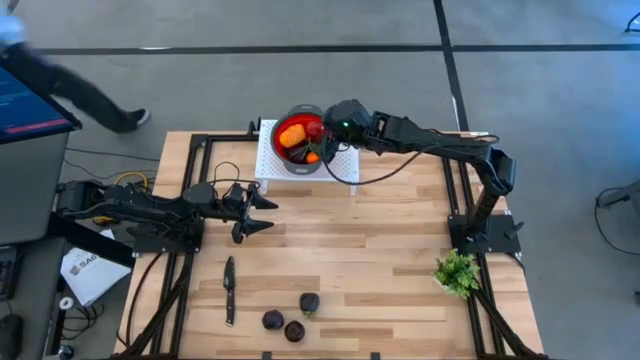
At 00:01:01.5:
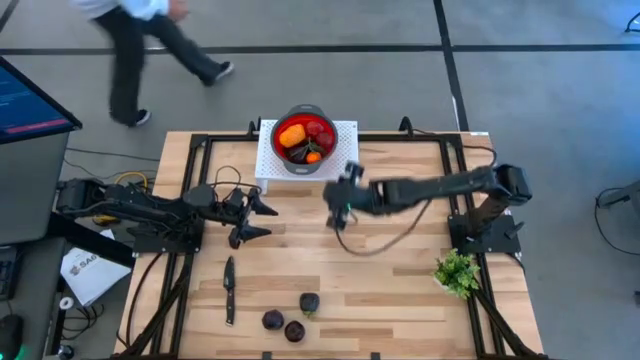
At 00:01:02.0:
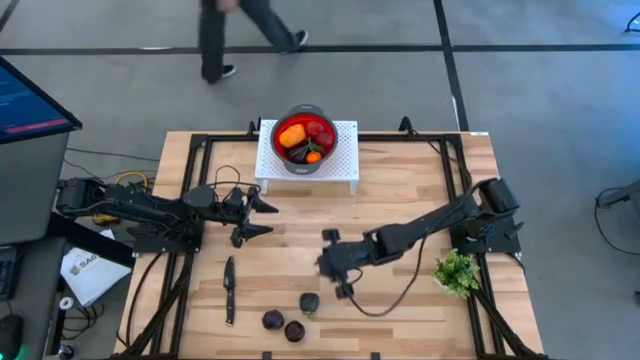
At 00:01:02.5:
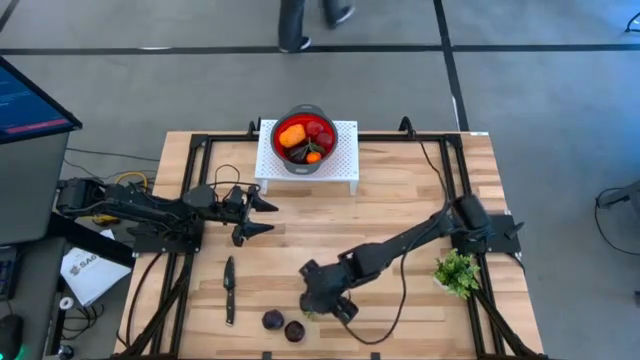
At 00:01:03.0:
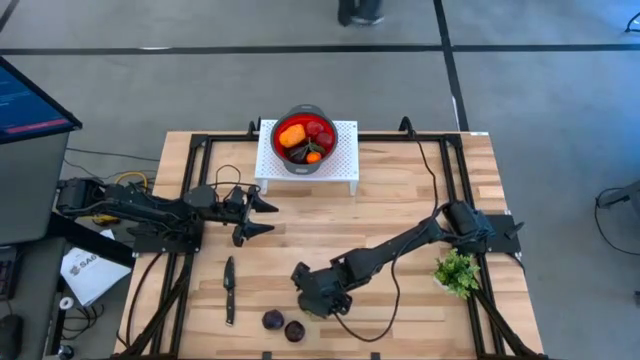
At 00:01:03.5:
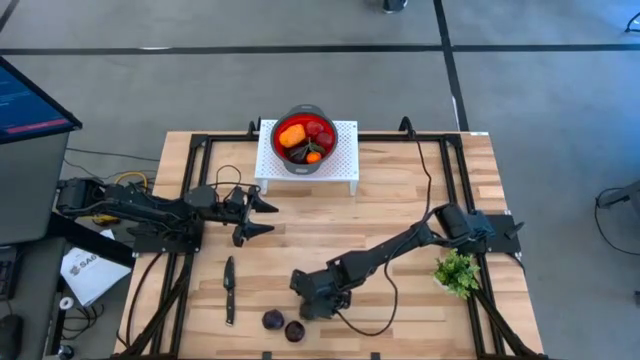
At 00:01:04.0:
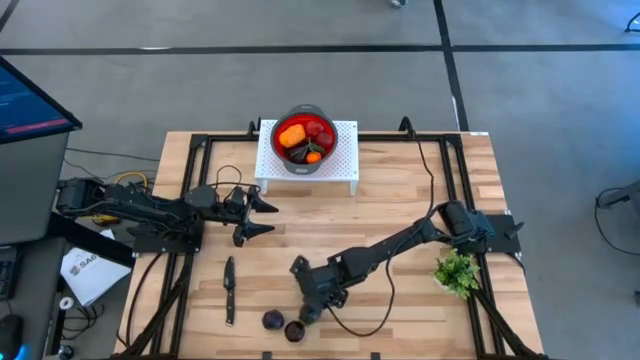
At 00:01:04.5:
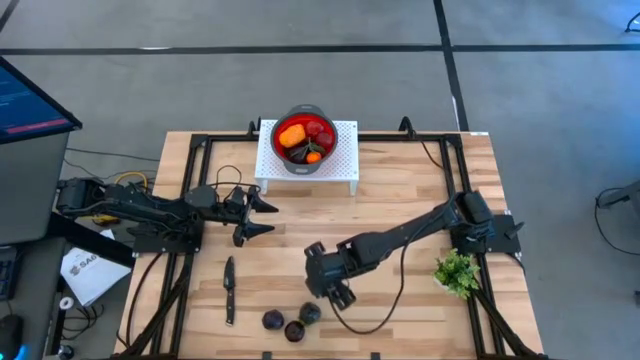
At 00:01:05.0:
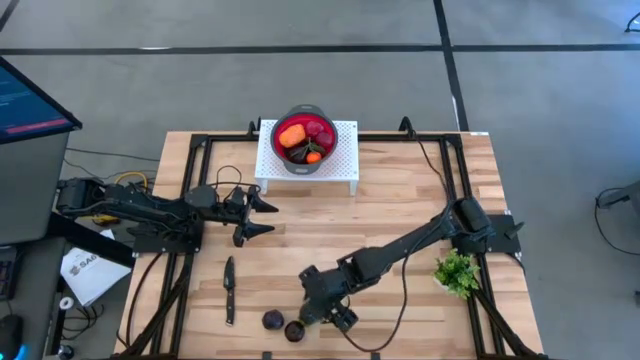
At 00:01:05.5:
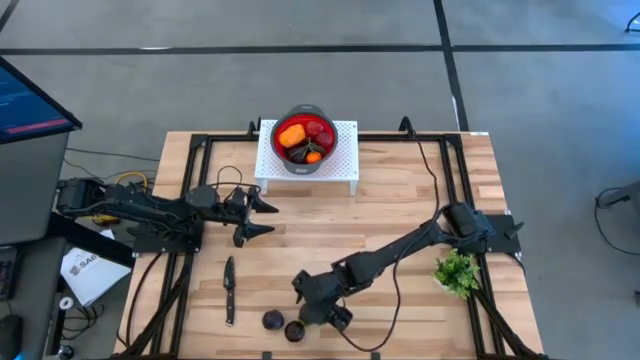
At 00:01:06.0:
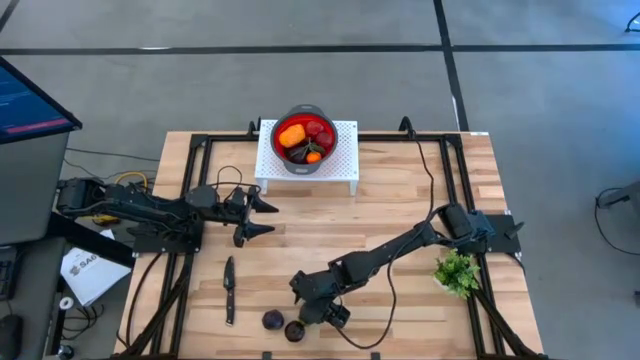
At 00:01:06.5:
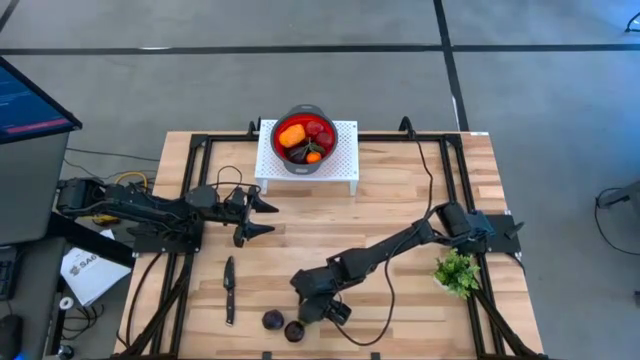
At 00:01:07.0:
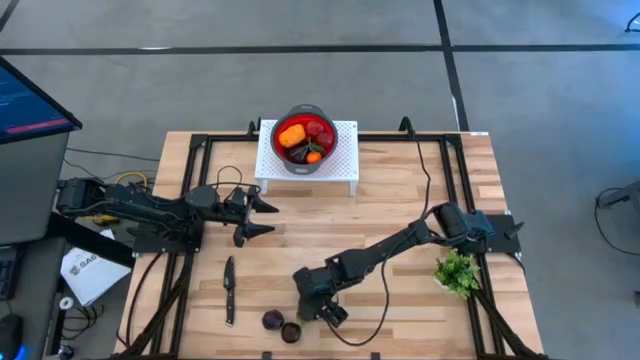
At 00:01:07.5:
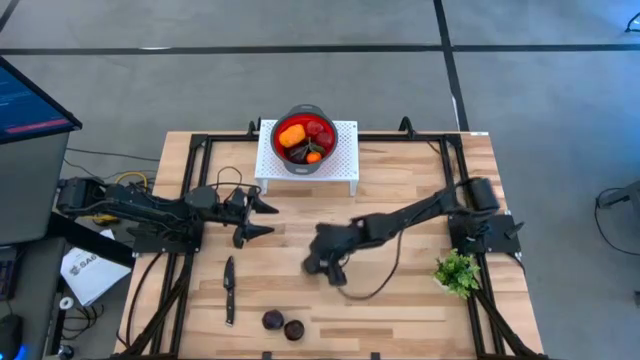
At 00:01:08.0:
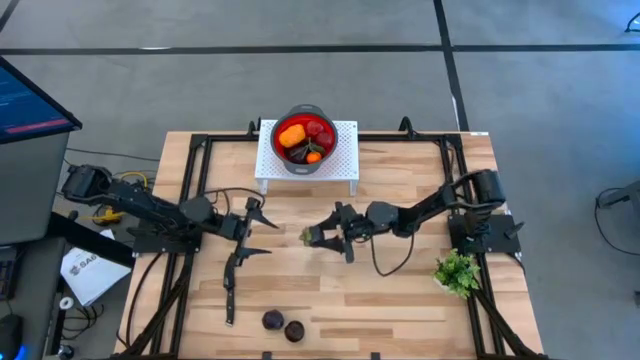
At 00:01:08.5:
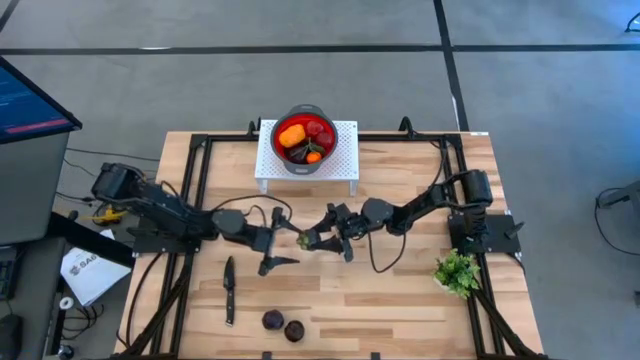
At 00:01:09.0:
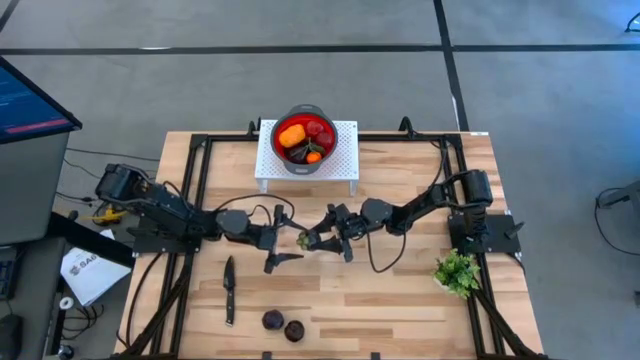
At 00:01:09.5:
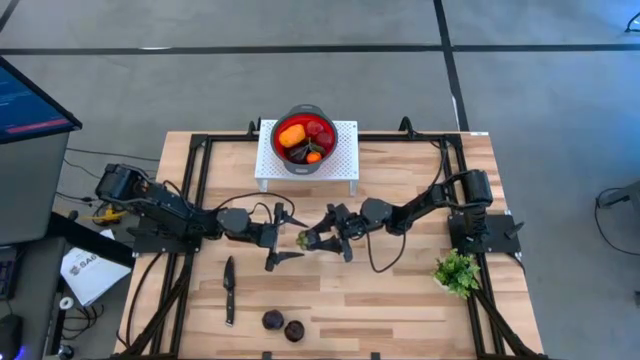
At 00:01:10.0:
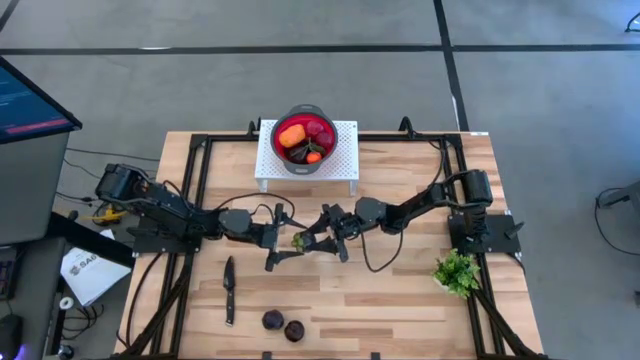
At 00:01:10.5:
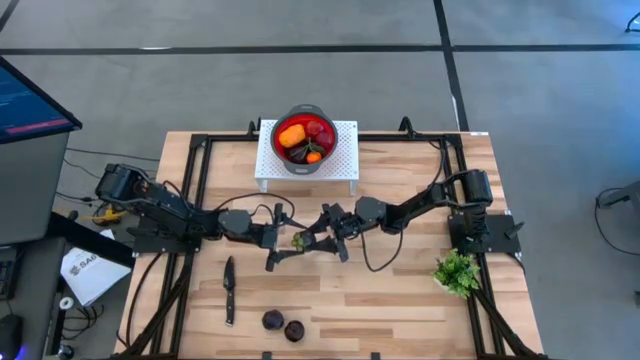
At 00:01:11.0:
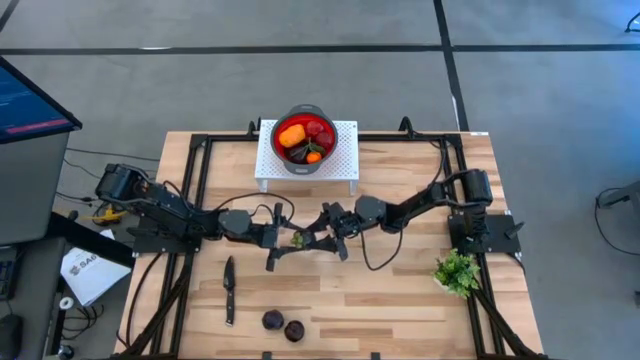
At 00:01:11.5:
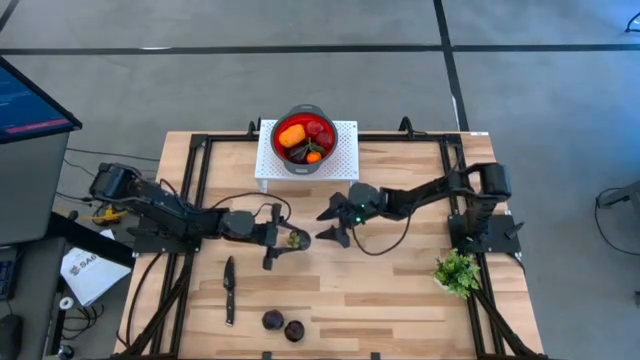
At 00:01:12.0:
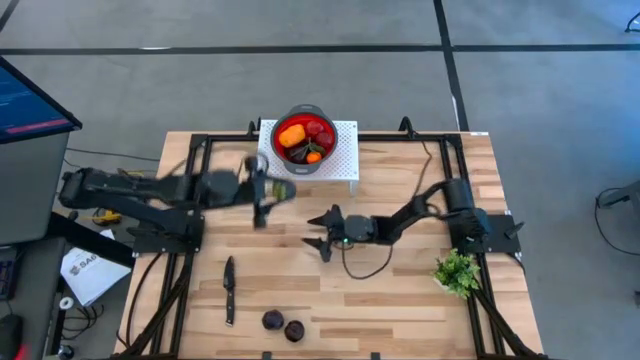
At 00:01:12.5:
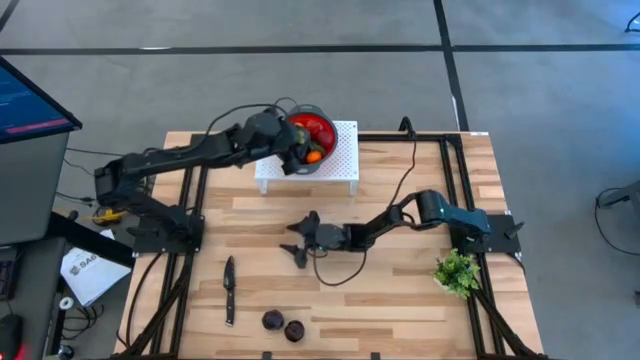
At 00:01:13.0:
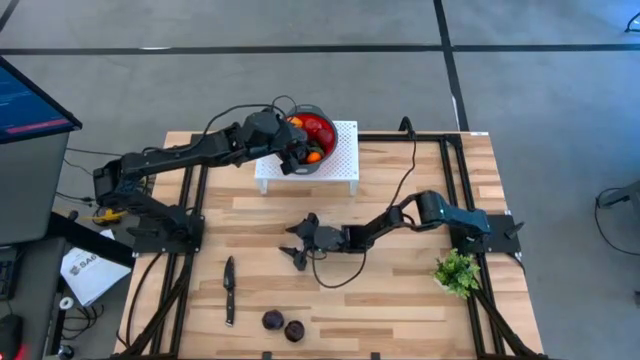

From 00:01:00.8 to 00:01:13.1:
Task: Pick & Place Fruit
Put the mangosteen into the red strainer bowl

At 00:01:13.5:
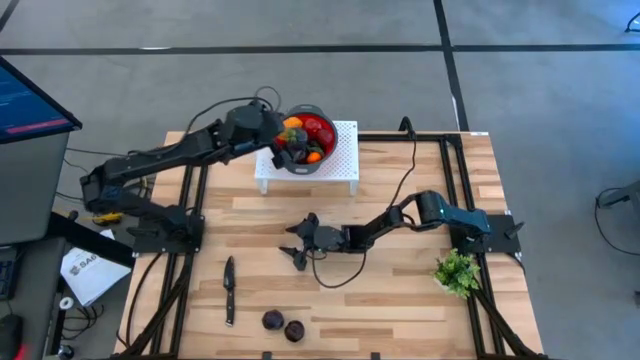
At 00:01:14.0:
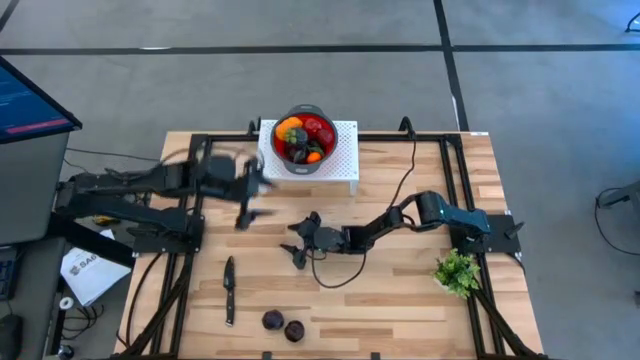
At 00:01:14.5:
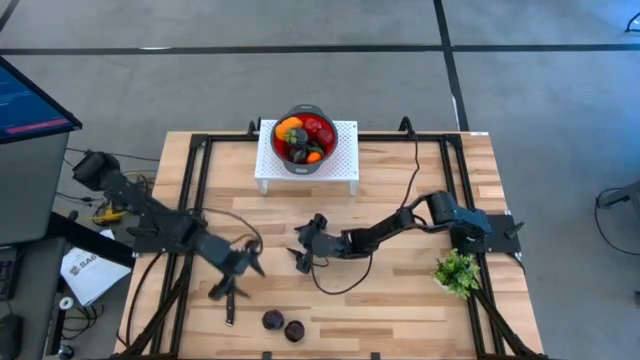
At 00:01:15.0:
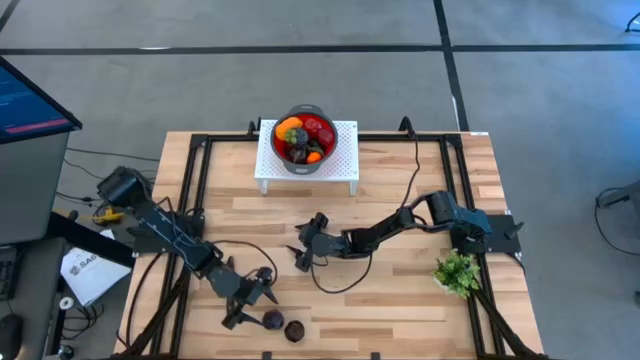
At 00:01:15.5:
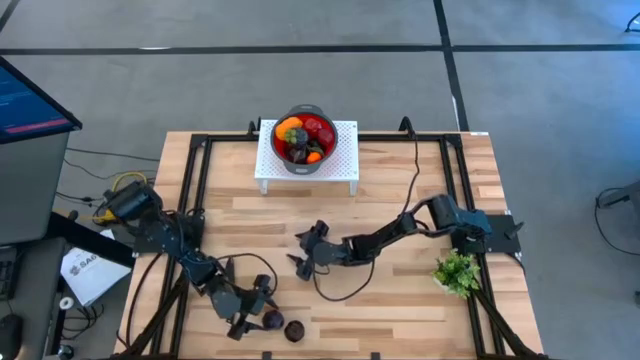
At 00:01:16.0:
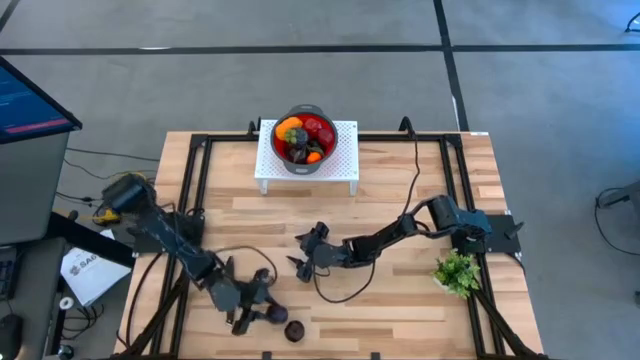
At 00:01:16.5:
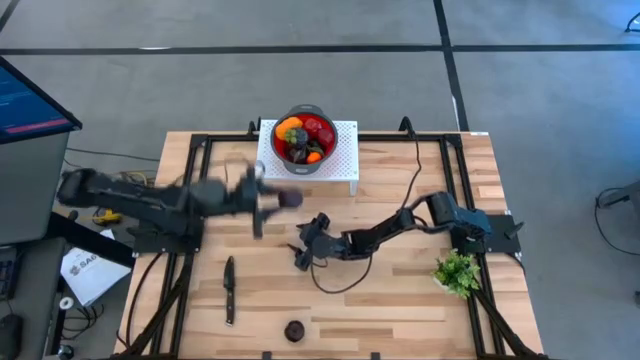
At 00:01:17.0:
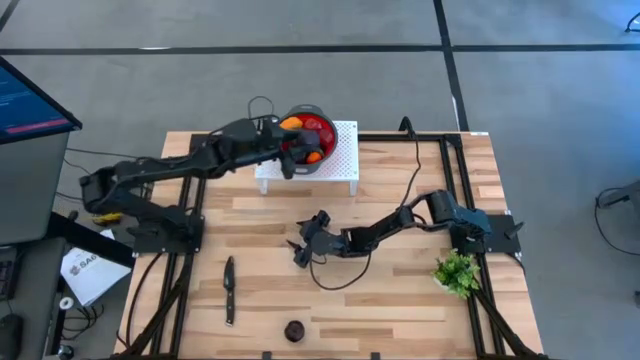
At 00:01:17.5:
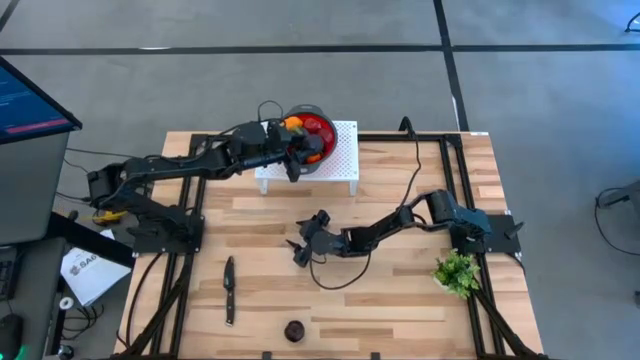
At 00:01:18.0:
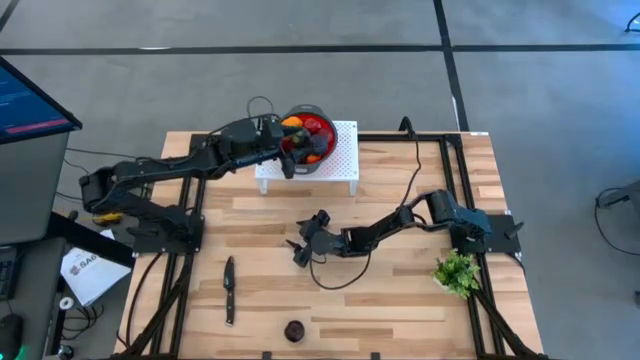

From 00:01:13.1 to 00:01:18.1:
Put the plum into the red strainer bowl

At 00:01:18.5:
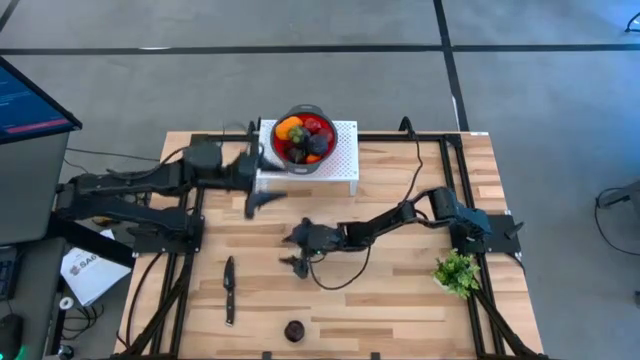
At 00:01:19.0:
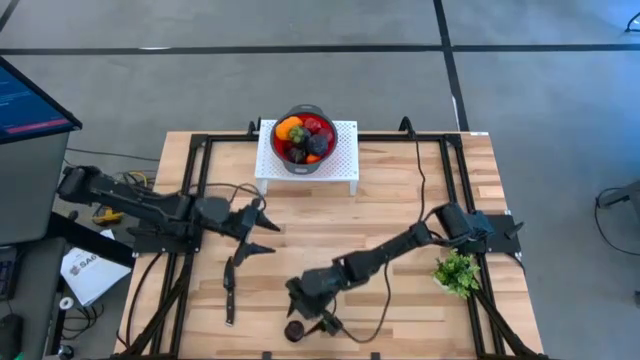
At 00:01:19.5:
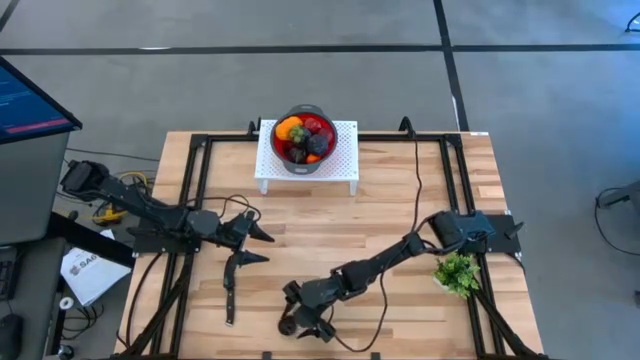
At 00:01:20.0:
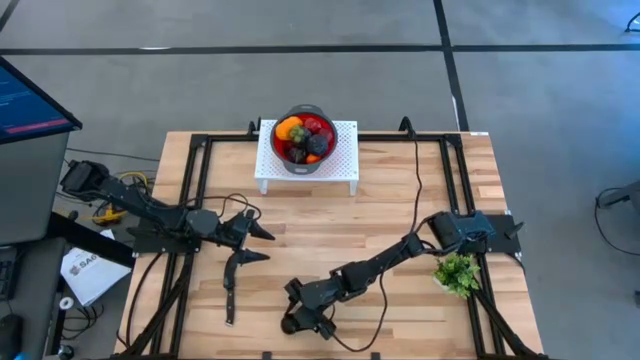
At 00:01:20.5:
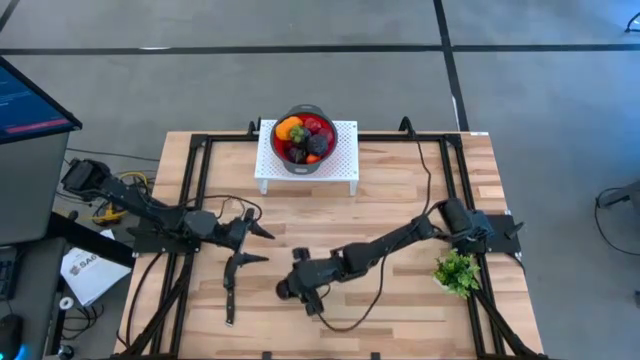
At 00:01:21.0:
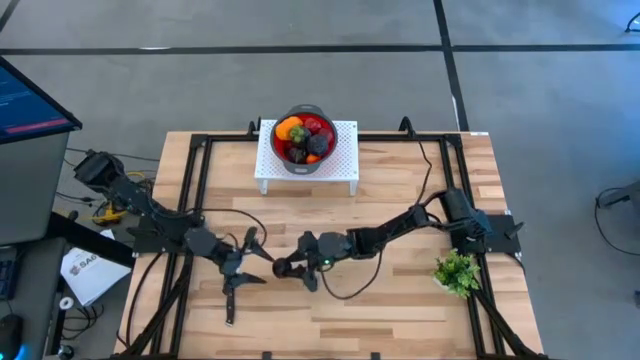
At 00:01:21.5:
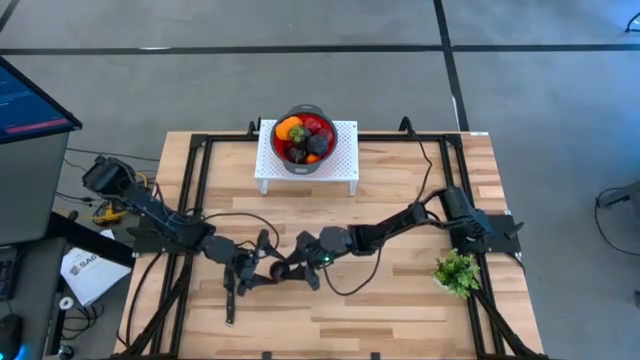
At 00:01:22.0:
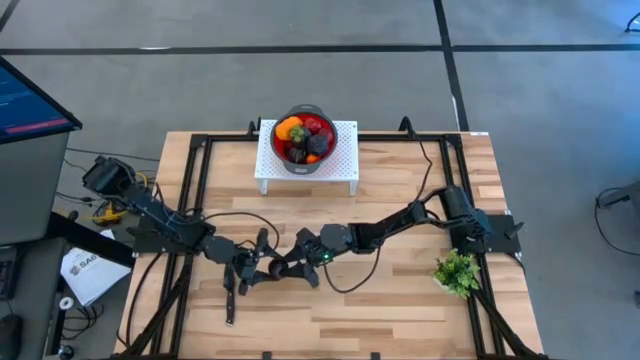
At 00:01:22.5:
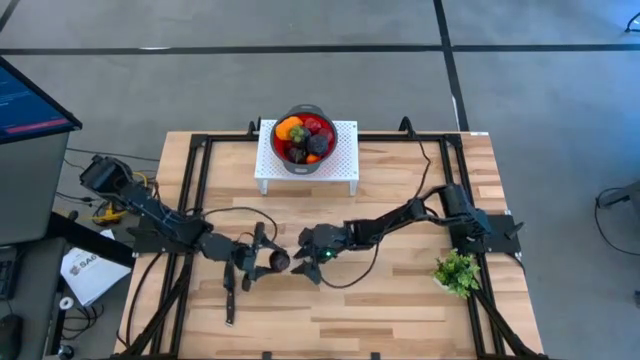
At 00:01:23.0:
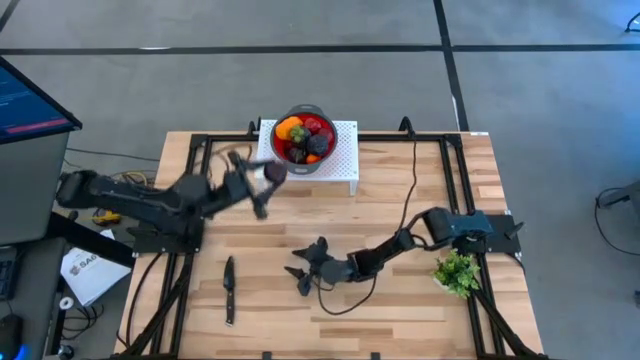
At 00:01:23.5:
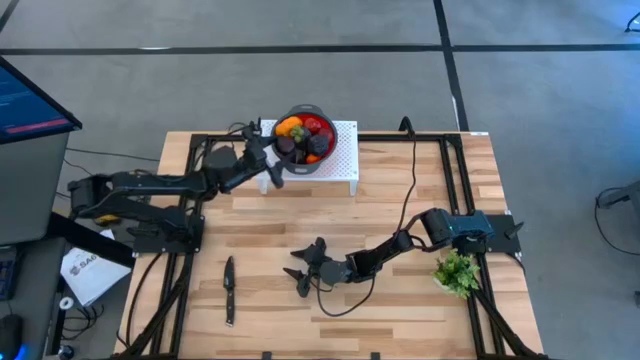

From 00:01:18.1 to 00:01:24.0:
Put the plum into the red strainer bowl
